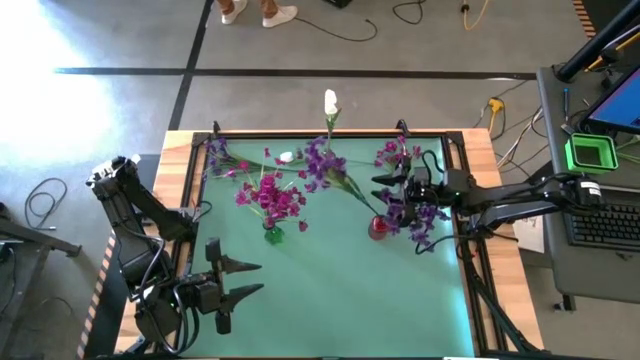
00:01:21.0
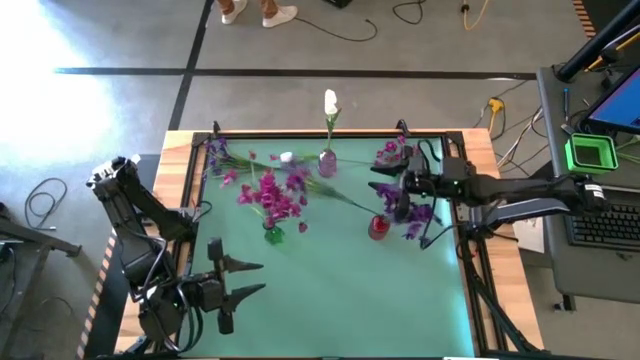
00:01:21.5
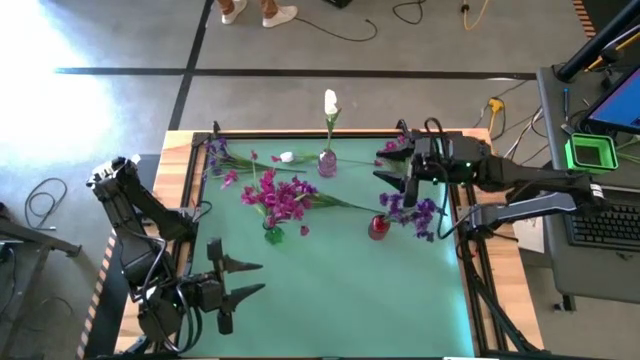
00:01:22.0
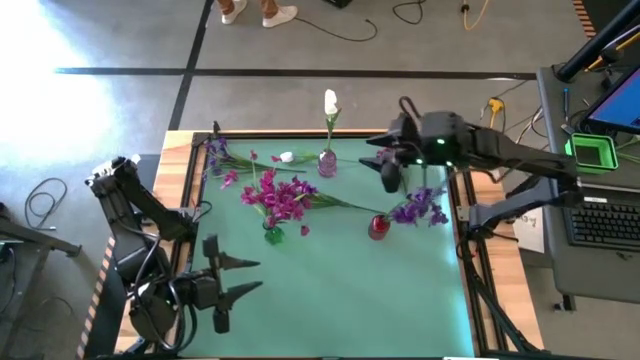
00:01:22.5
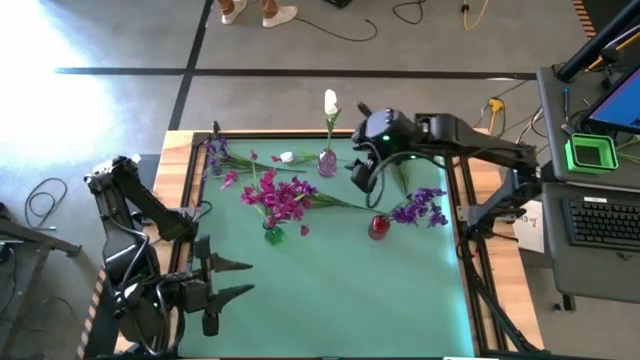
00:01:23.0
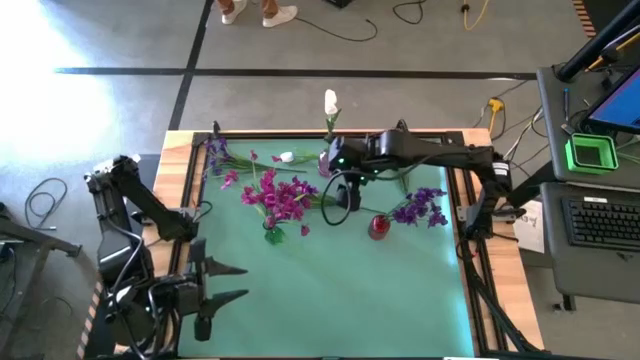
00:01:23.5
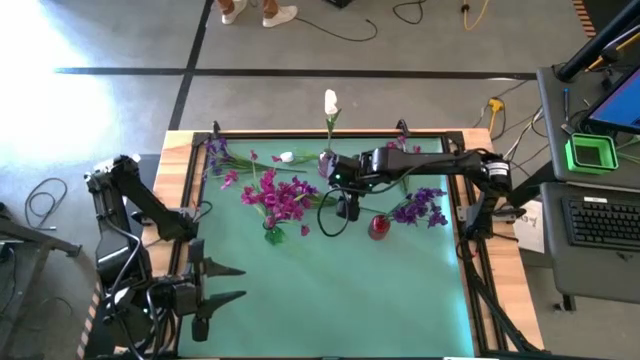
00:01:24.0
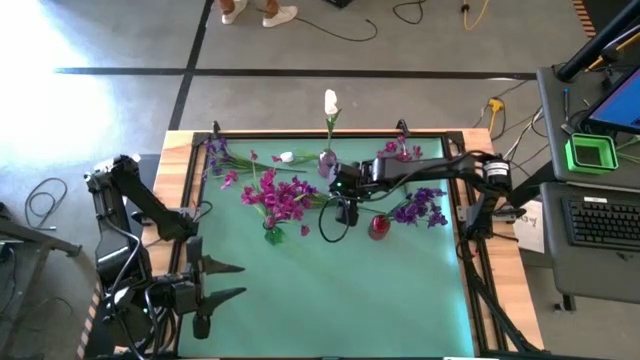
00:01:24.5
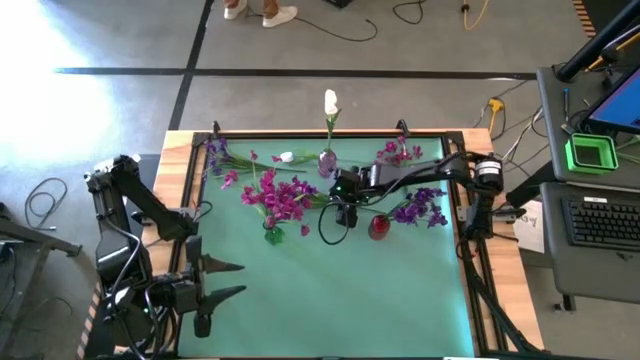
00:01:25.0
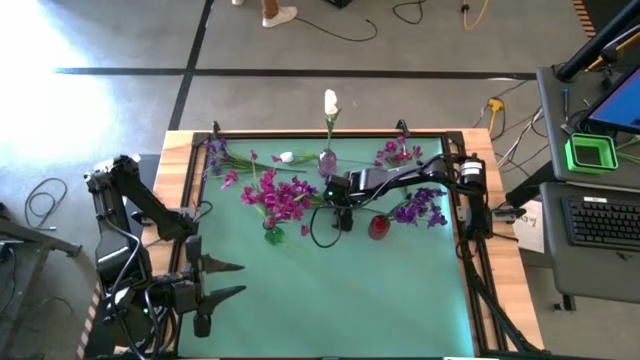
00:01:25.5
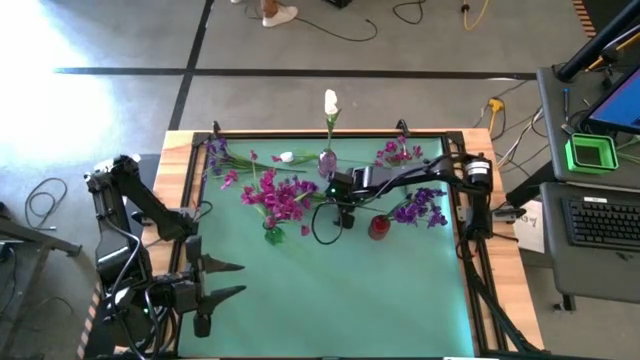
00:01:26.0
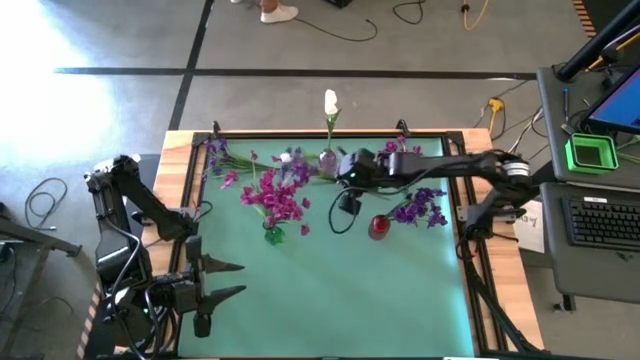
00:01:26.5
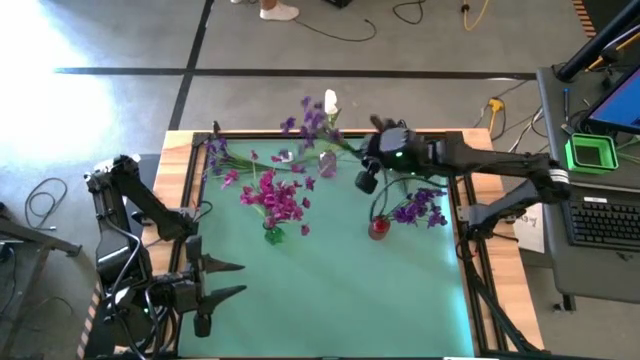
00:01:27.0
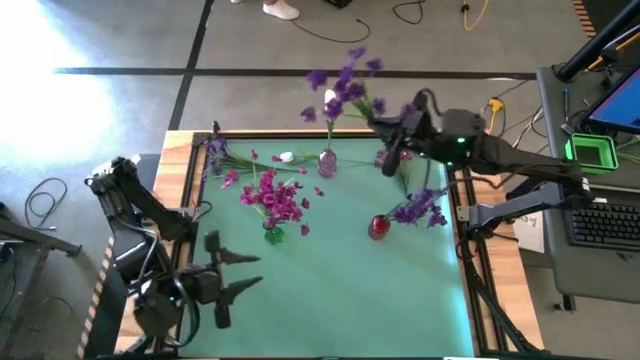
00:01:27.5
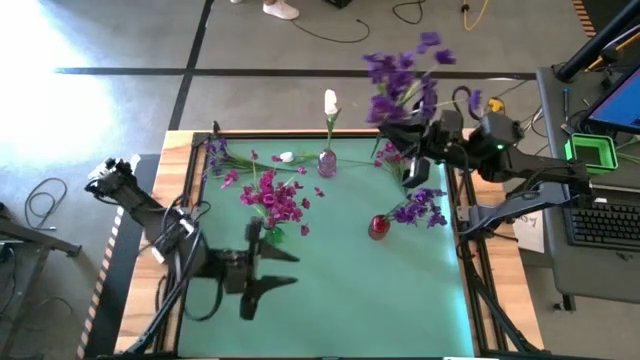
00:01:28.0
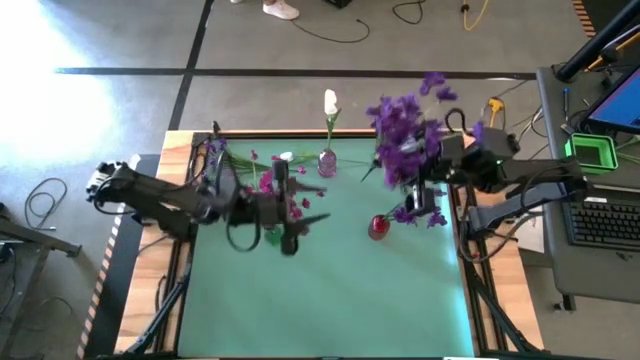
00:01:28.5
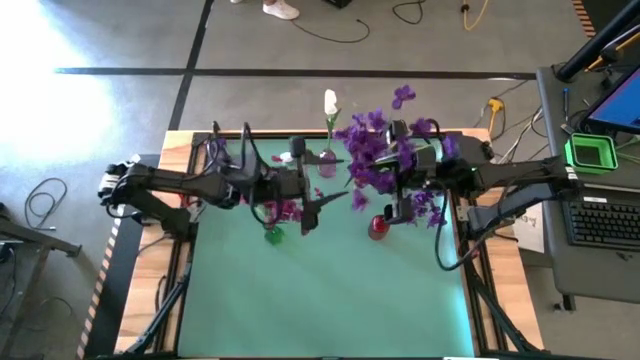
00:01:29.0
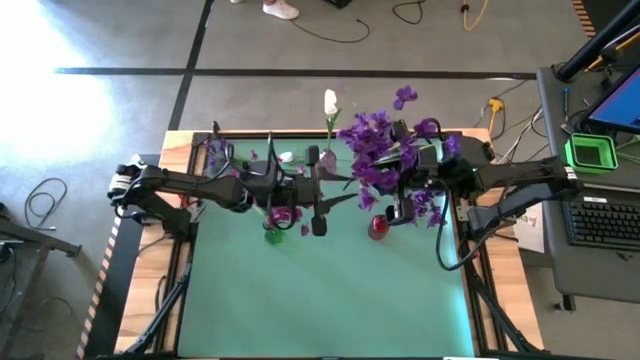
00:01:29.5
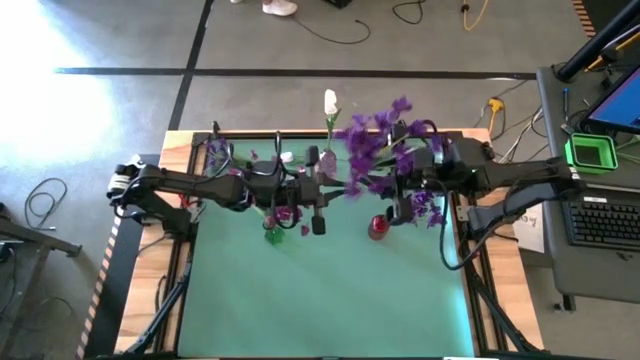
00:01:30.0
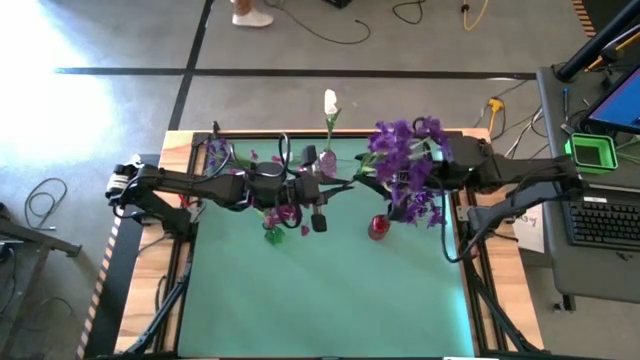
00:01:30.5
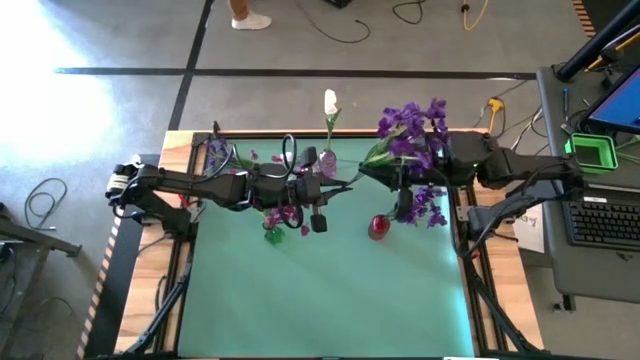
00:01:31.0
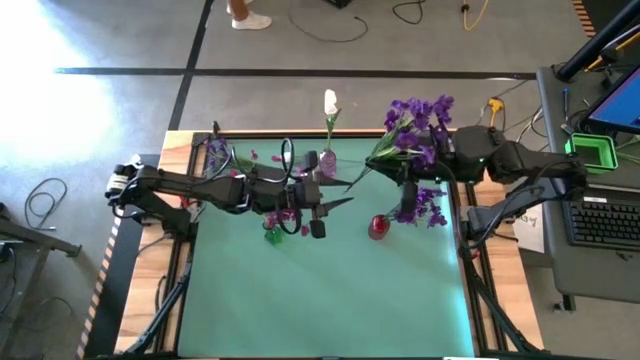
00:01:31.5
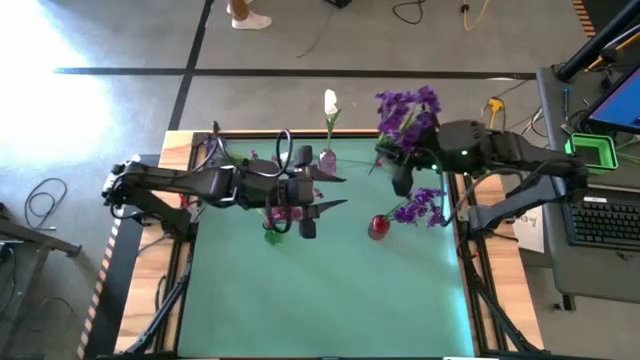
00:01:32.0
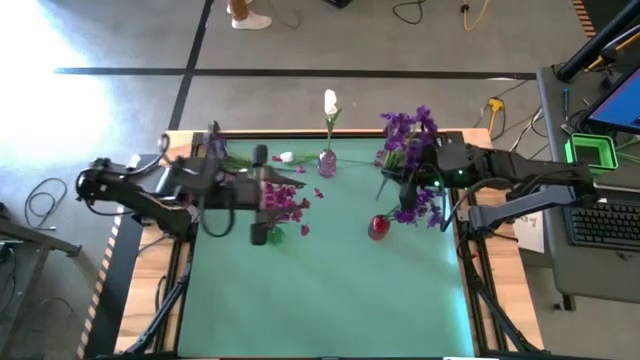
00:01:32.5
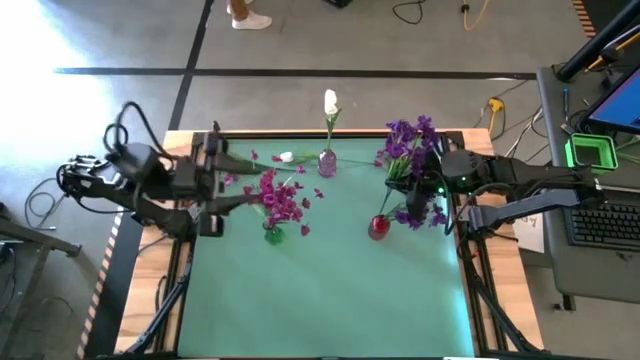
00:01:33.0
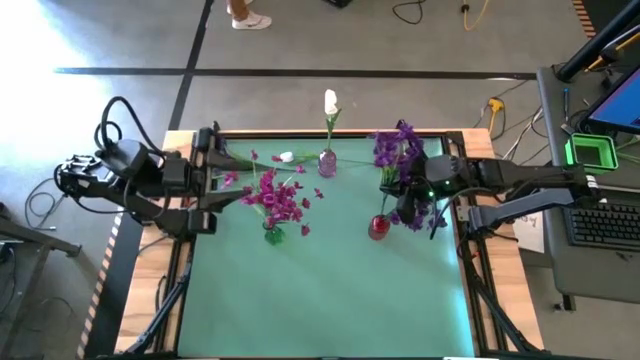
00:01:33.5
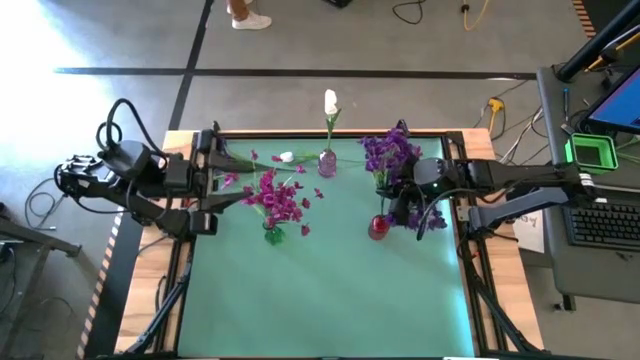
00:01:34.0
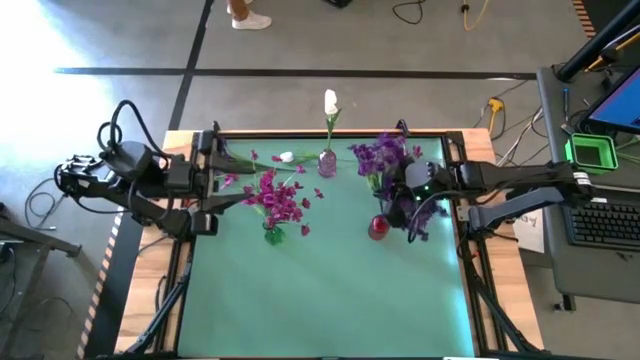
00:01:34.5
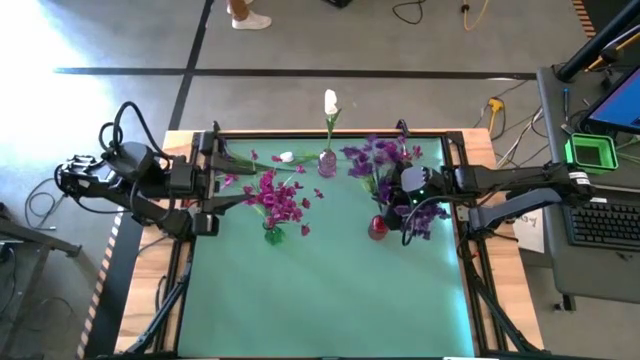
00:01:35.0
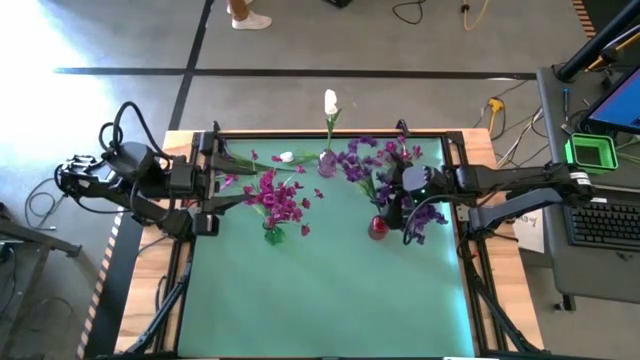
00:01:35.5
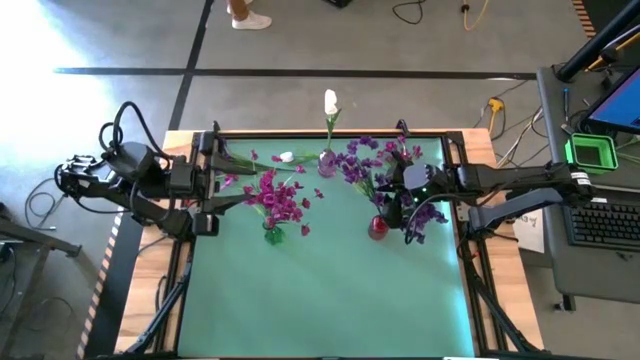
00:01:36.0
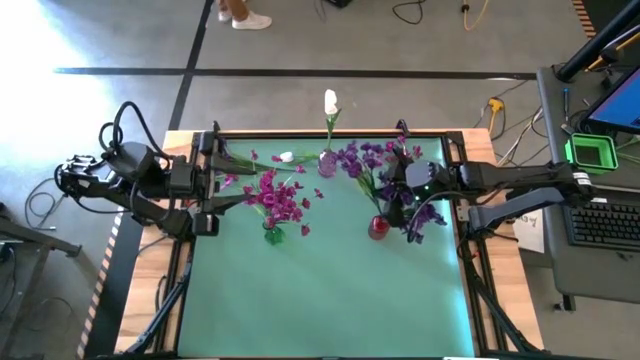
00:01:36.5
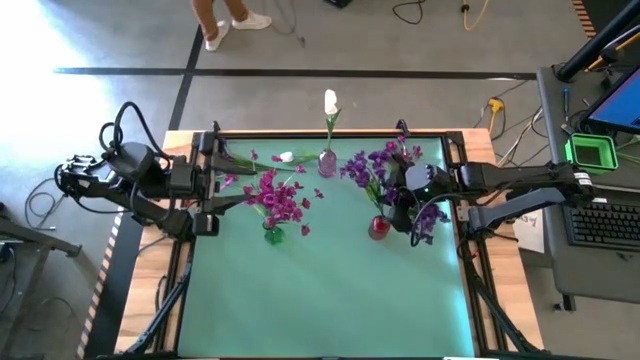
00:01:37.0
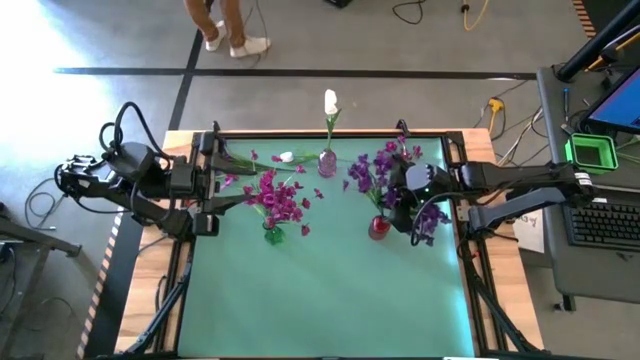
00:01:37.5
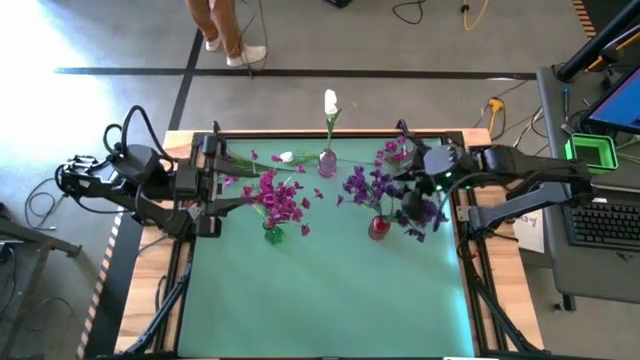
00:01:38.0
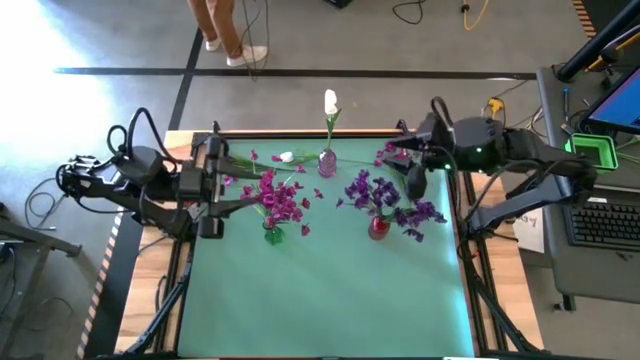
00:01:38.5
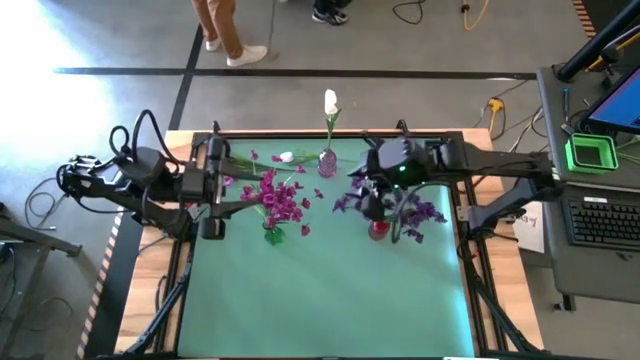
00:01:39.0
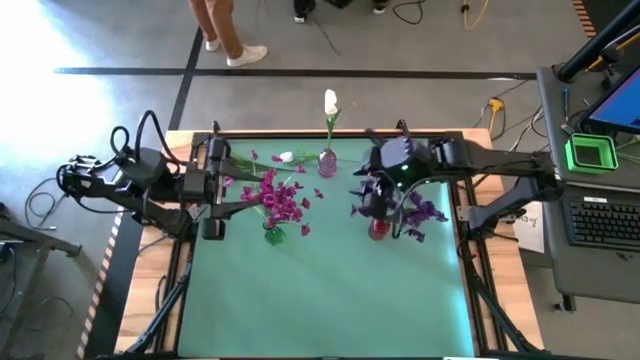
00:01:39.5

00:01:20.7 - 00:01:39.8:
Task: Sort flowers into vase by color
Put the bottom violet flowers into the red flower vase

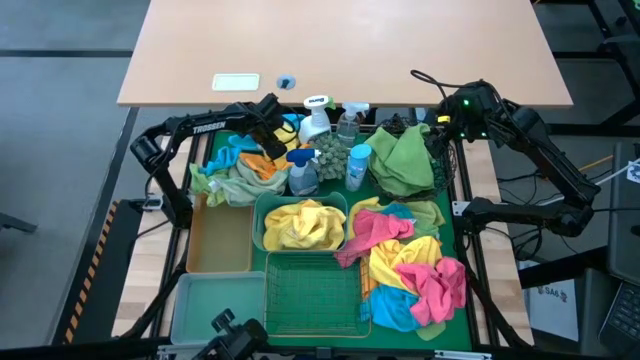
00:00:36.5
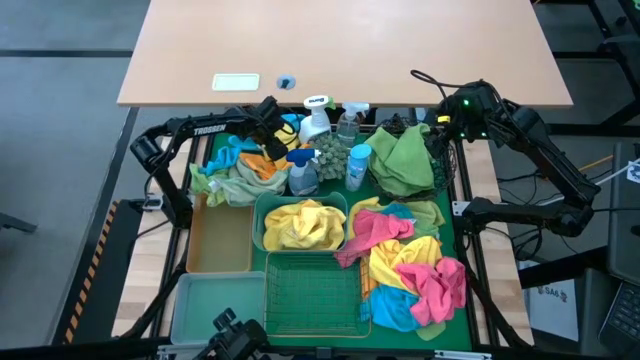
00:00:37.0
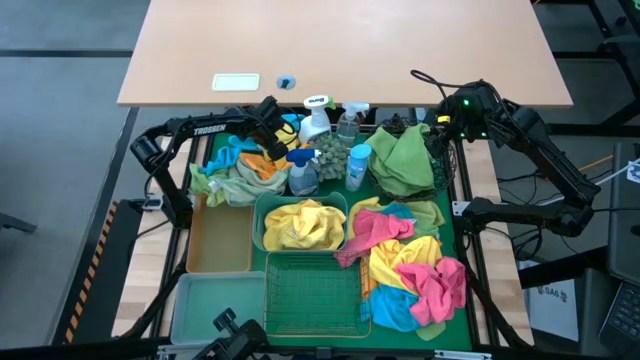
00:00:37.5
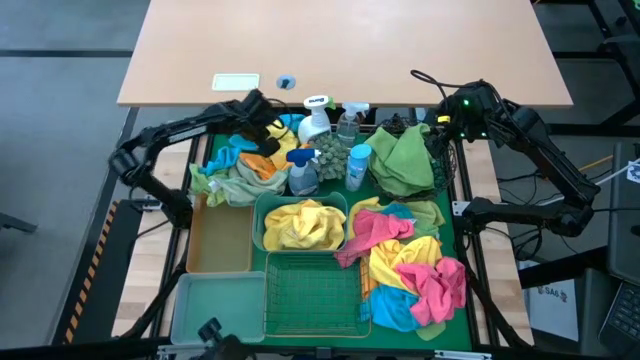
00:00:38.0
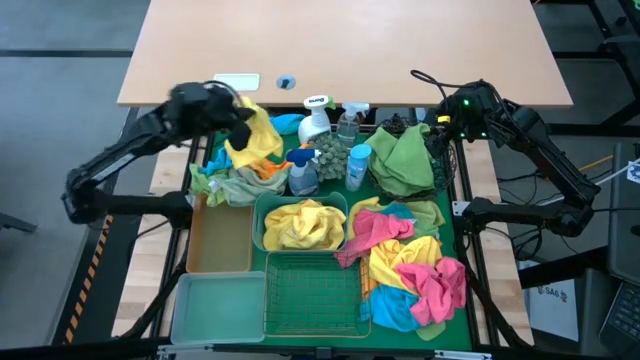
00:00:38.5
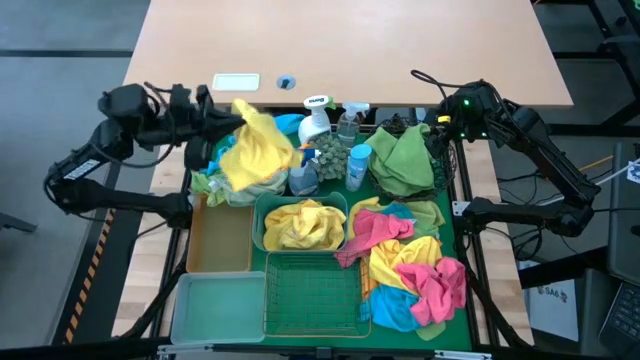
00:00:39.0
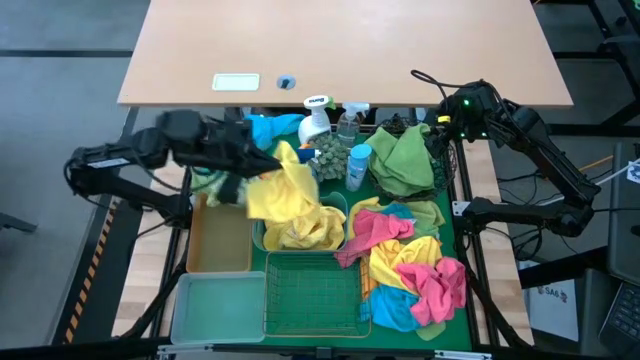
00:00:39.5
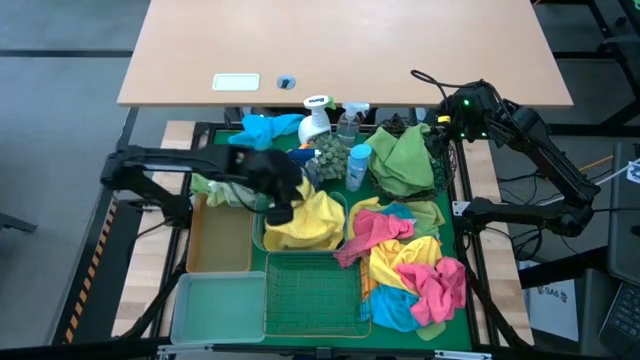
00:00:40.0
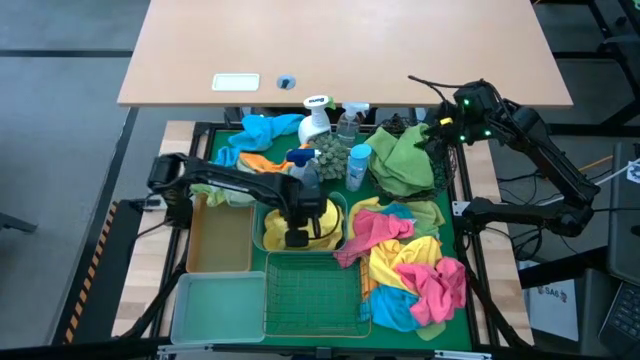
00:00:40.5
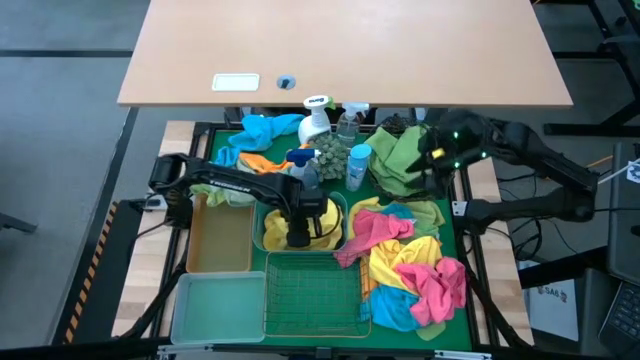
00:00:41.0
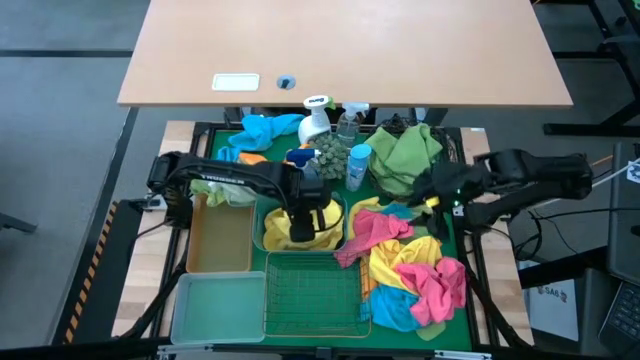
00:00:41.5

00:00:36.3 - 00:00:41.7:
Task: Sort microfiber towel by color & place in baskets
Put the yellow microfiber towel into the blue bin
